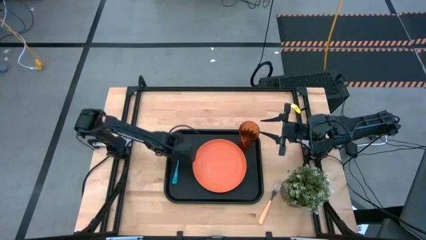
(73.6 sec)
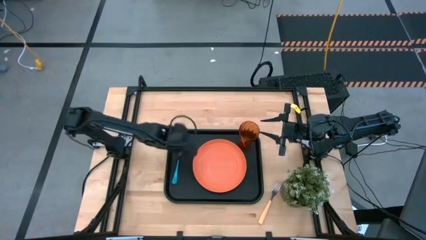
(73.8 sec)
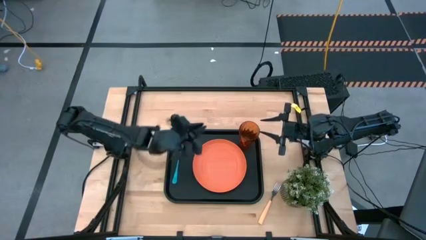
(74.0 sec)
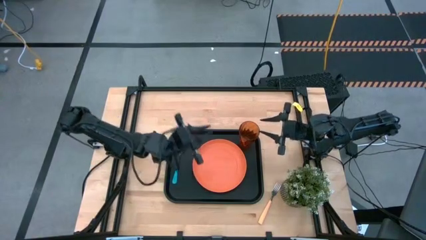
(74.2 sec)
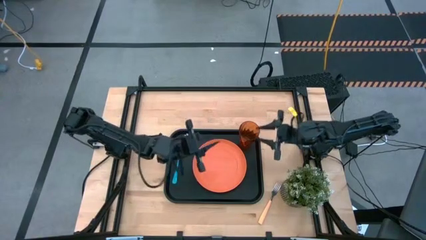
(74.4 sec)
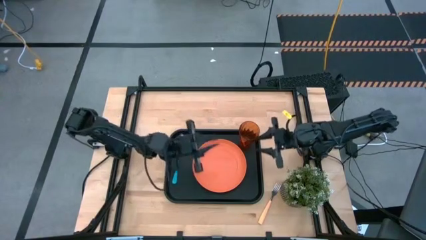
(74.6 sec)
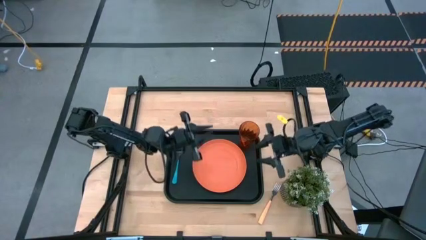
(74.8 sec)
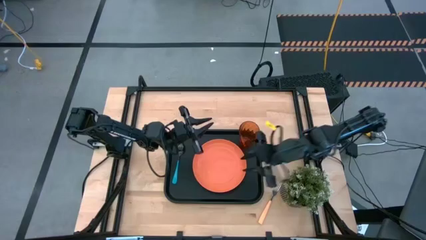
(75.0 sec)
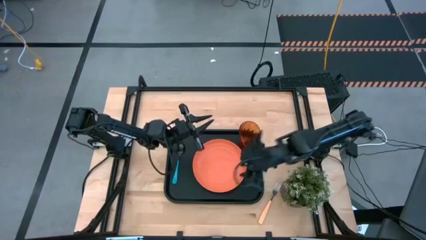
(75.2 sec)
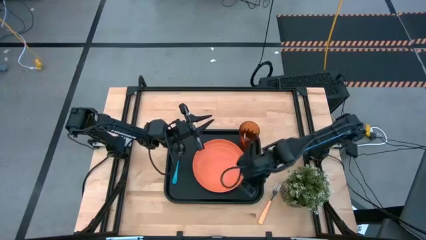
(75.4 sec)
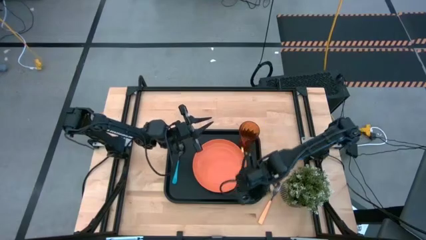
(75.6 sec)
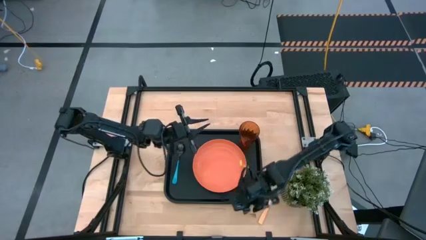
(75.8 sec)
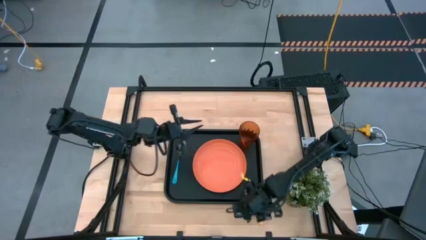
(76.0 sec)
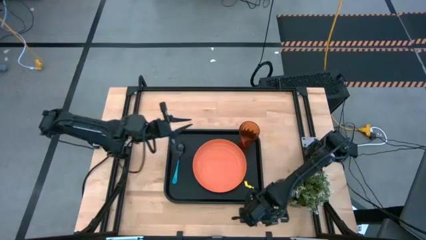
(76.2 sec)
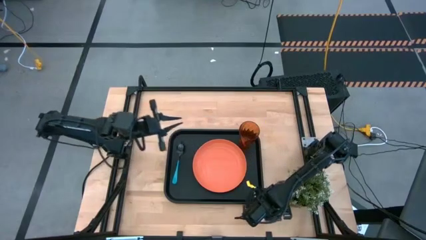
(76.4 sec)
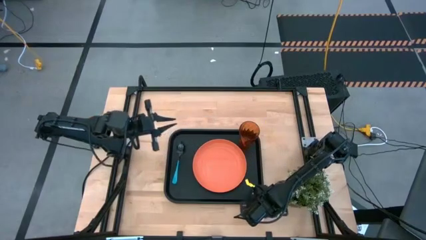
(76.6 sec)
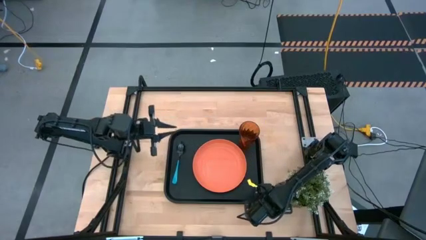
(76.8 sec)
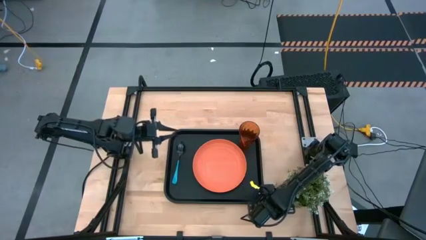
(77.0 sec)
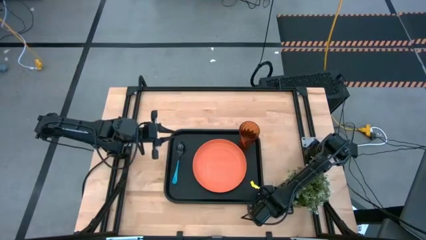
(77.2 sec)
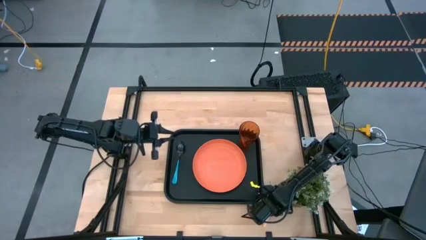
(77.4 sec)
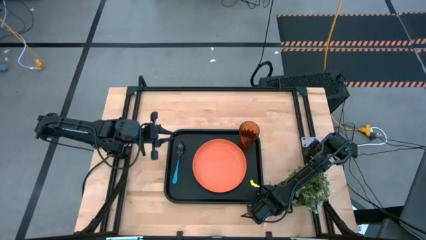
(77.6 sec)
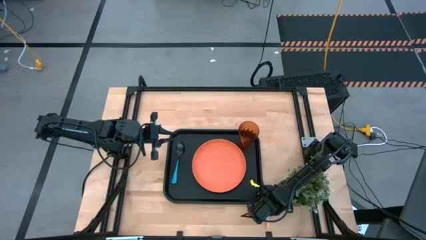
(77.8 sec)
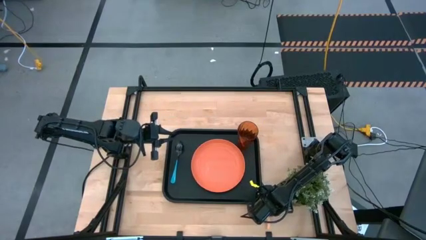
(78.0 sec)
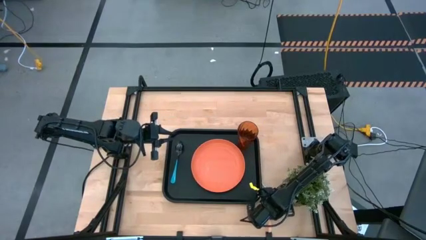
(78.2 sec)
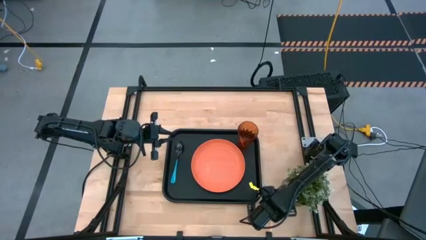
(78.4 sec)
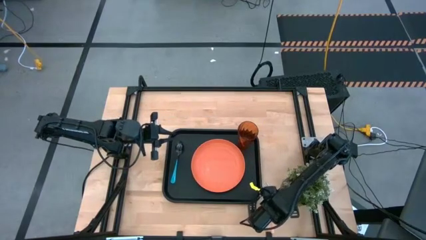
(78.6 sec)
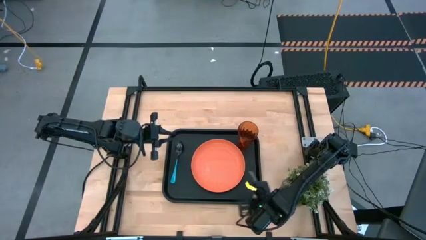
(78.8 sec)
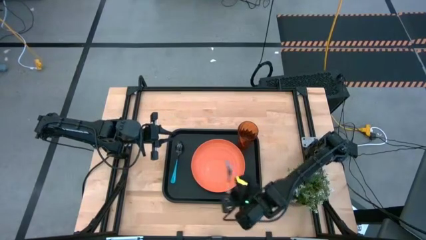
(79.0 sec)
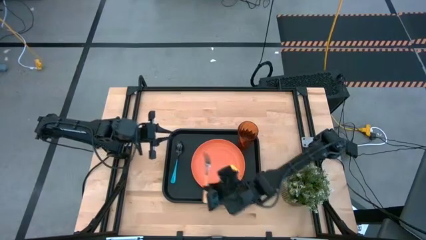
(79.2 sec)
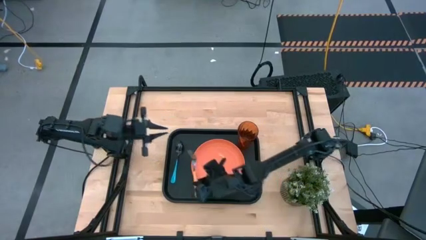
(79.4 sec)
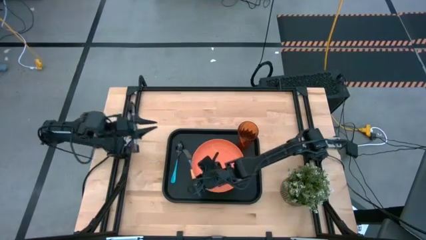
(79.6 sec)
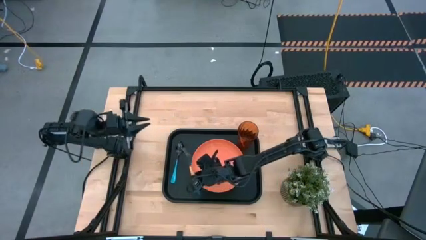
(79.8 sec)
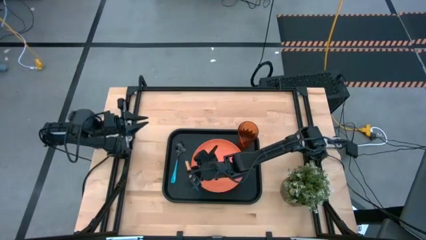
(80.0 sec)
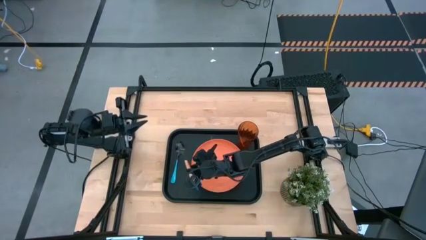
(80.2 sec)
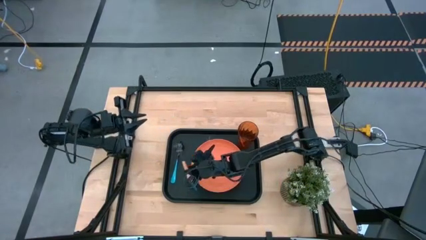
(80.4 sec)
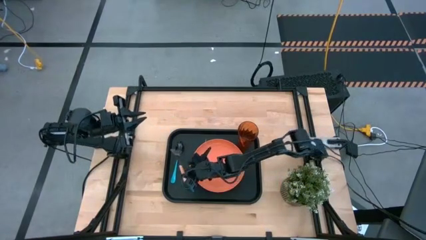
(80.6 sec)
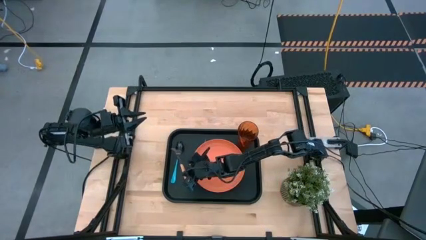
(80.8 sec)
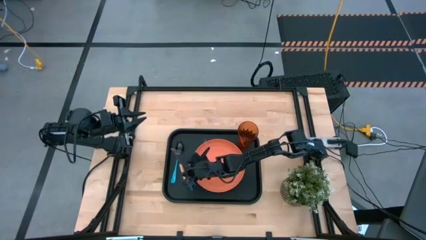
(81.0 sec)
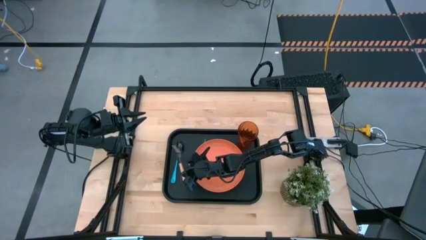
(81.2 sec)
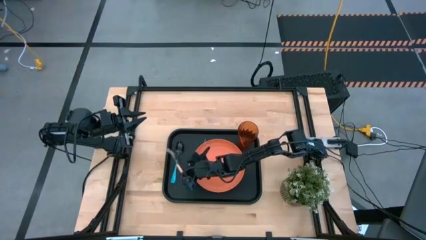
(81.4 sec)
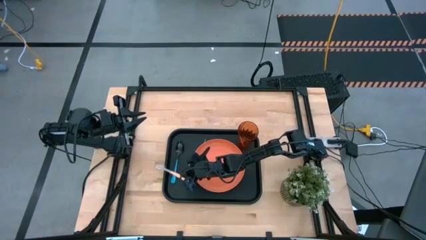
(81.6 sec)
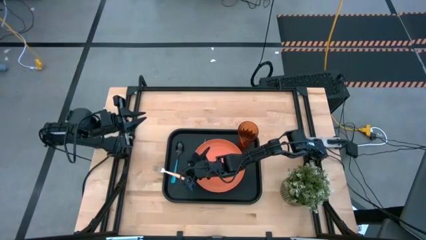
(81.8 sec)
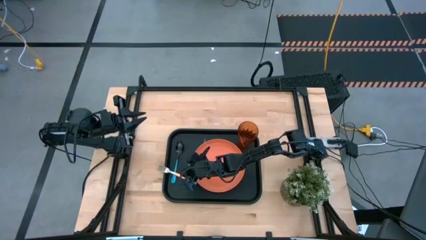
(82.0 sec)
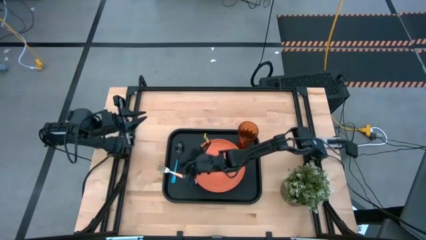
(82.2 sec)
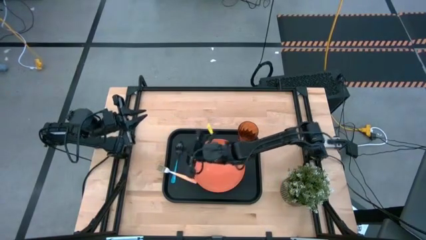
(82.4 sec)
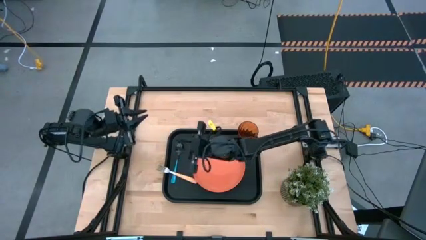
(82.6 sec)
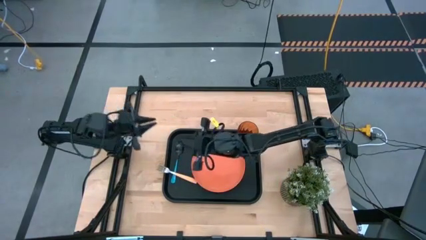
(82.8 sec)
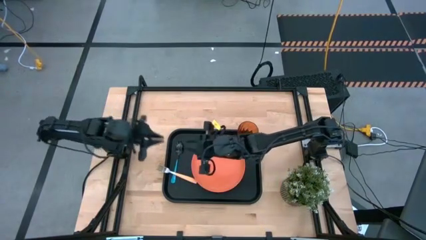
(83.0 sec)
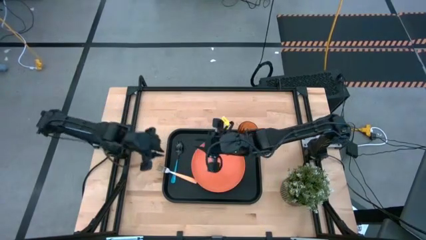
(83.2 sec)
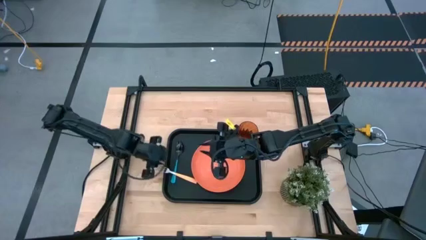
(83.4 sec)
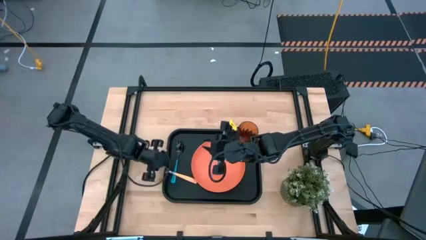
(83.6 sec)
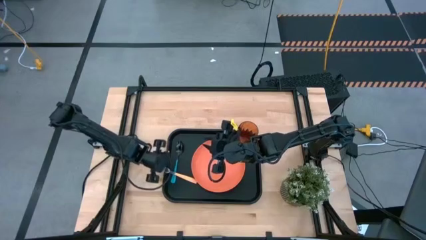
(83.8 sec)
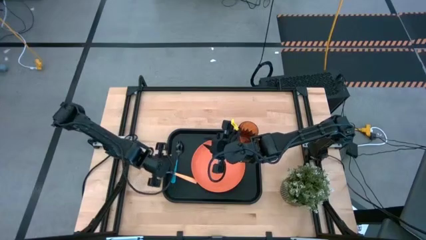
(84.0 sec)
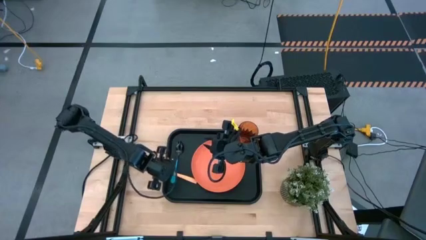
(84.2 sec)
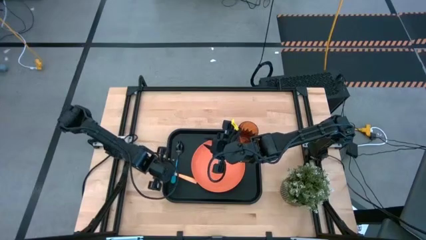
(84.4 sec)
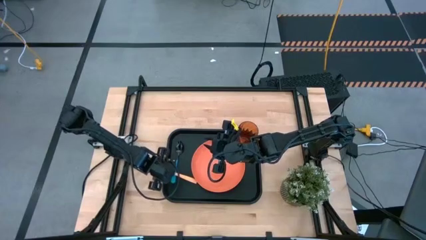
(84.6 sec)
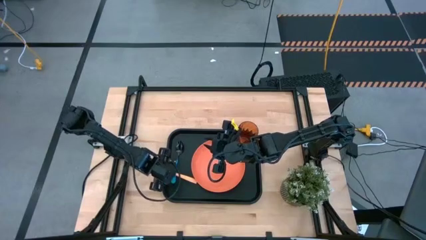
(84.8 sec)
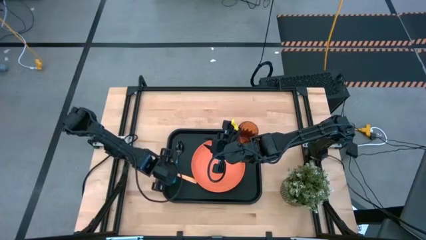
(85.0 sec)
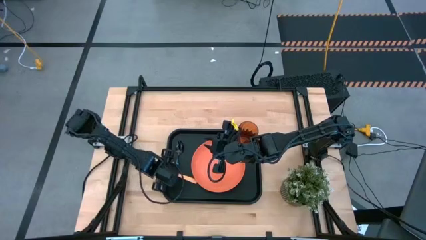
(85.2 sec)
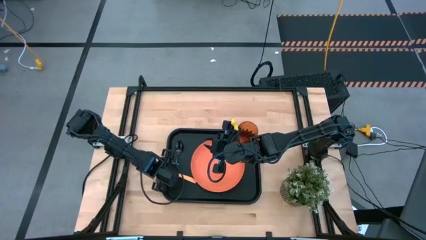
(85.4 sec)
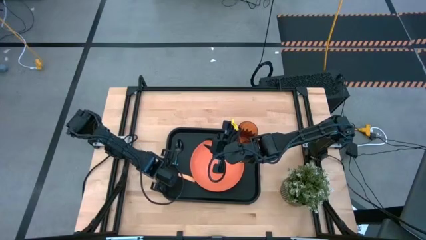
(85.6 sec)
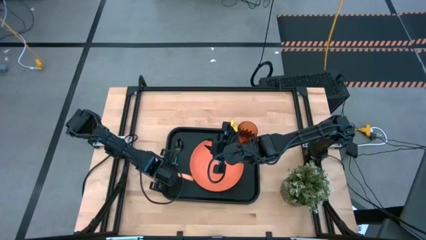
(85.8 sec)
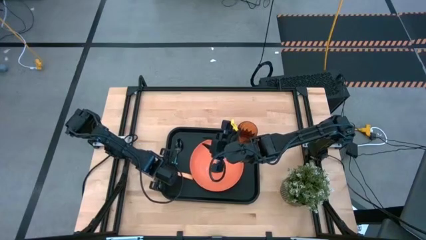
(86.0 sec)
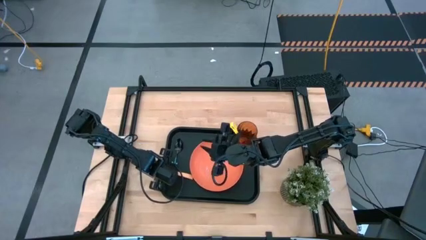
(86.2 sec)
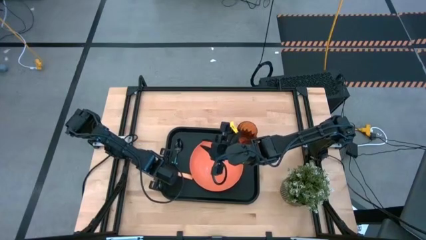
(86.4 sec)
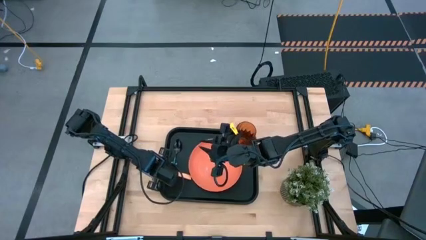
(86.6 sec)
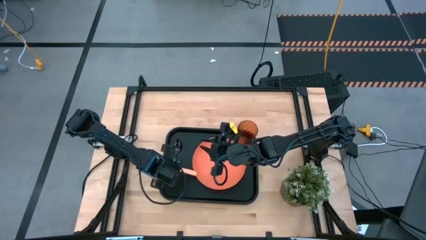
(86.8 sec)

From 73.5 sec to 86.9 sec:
Task: Pick and place plate/cup/fork/spoon on tray
Put the pink fork on the black serving tray
